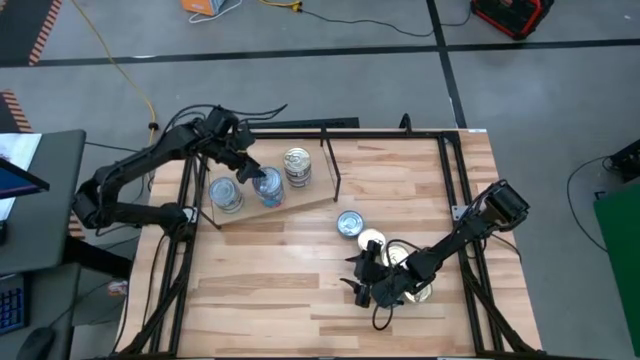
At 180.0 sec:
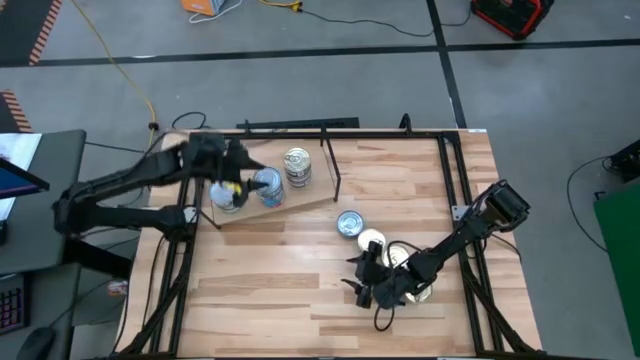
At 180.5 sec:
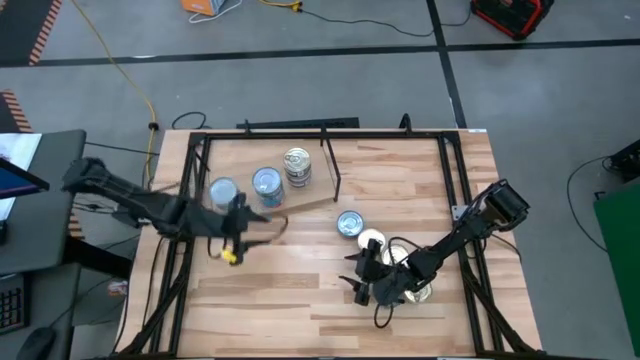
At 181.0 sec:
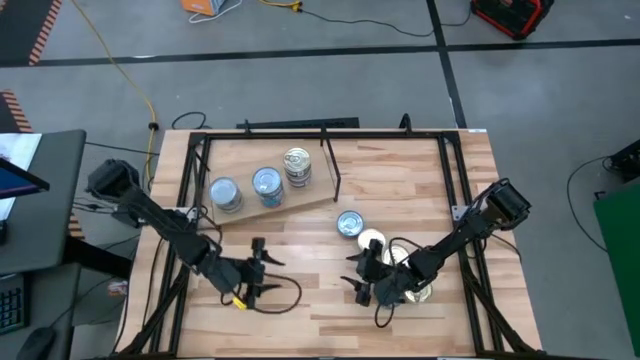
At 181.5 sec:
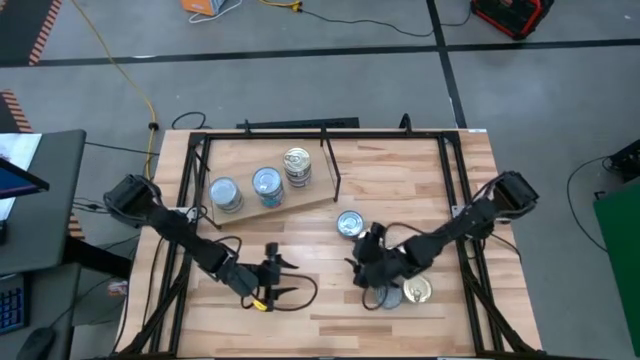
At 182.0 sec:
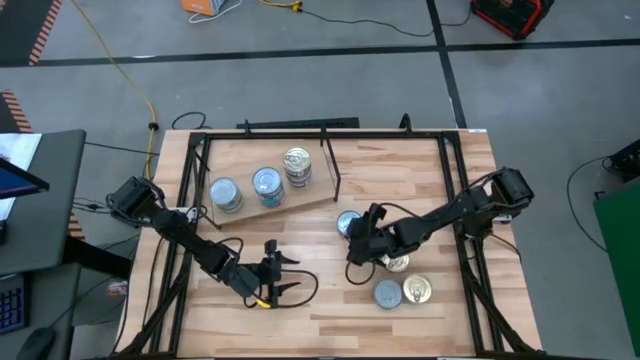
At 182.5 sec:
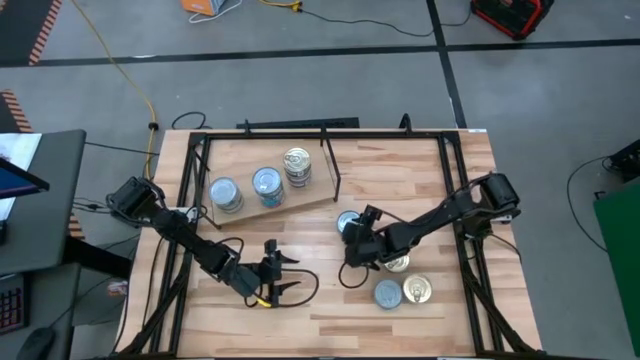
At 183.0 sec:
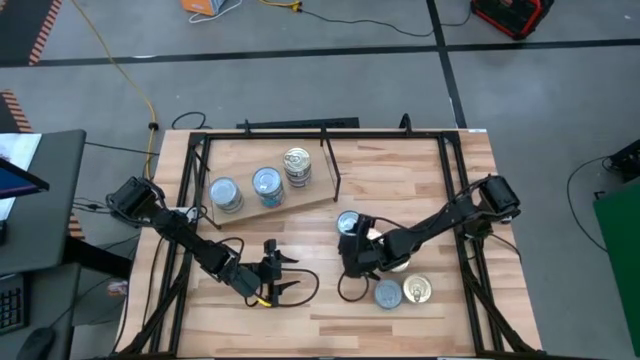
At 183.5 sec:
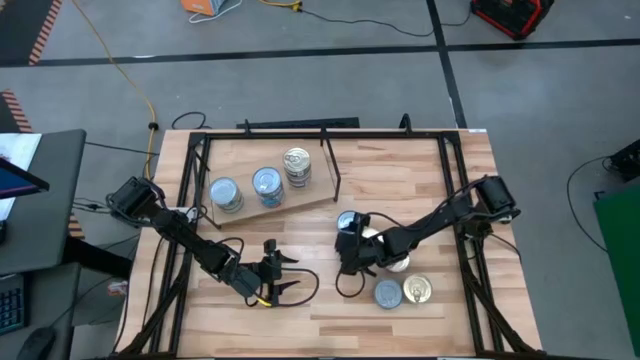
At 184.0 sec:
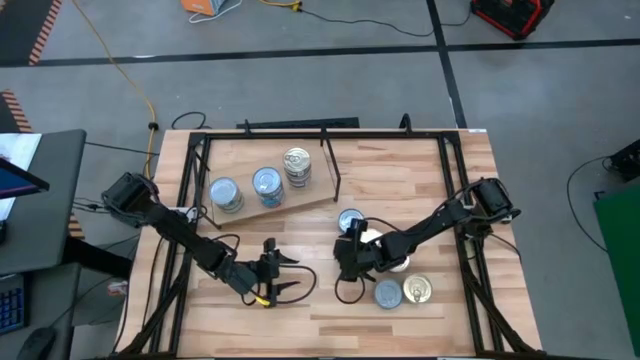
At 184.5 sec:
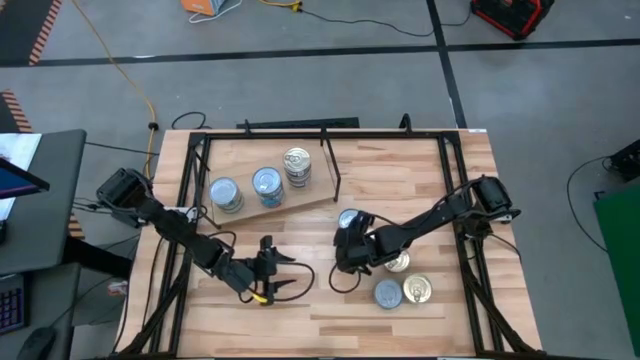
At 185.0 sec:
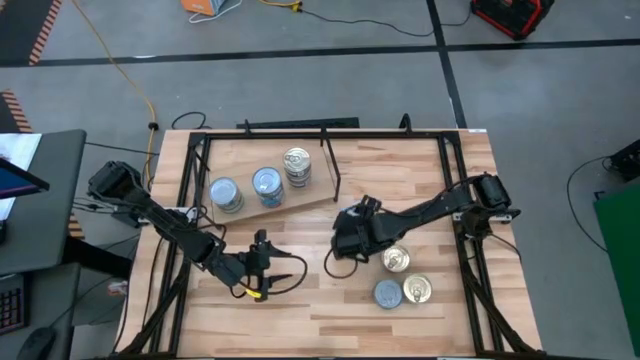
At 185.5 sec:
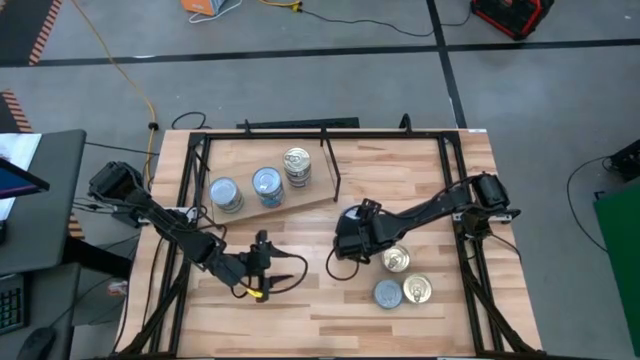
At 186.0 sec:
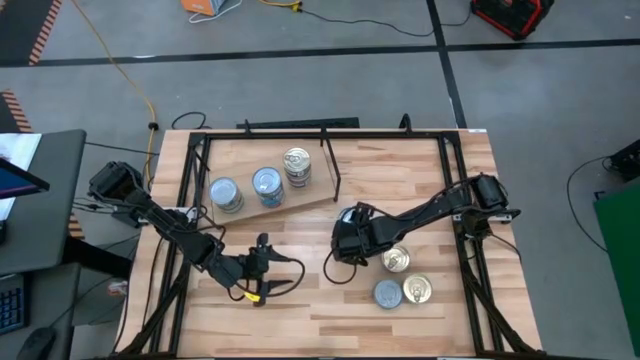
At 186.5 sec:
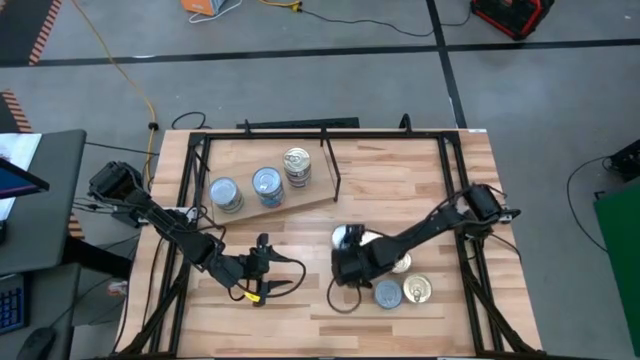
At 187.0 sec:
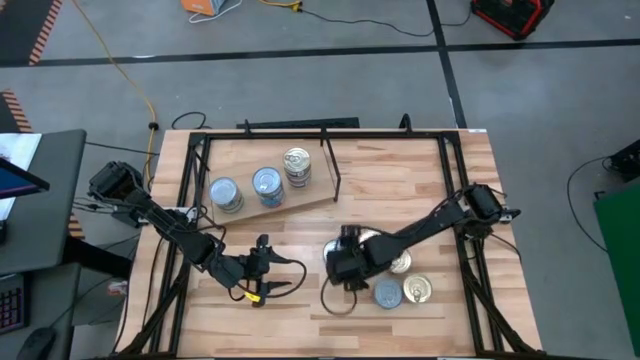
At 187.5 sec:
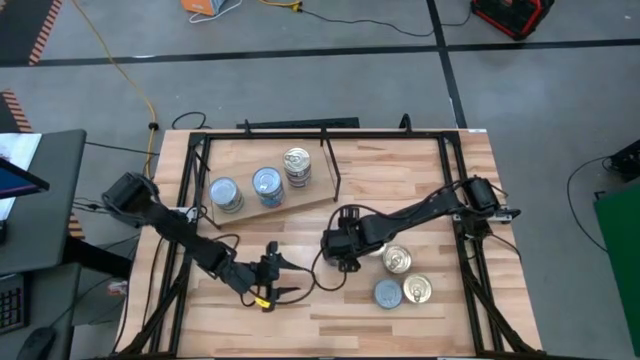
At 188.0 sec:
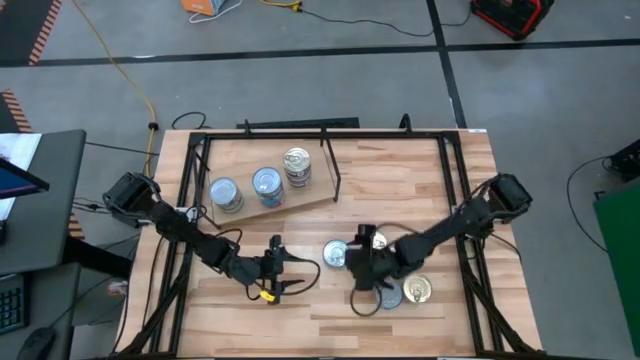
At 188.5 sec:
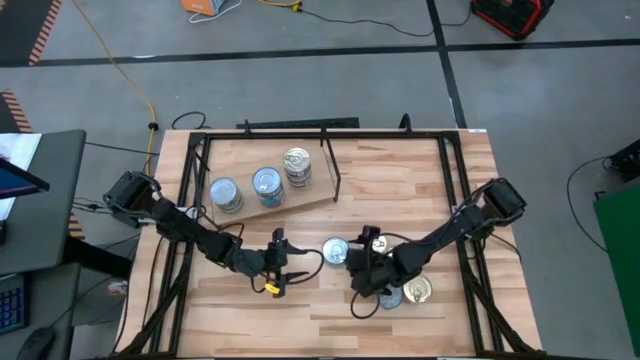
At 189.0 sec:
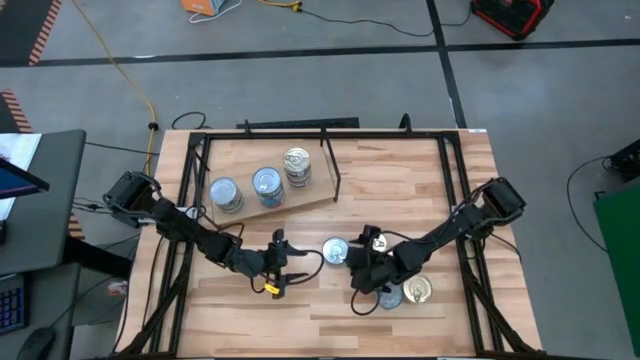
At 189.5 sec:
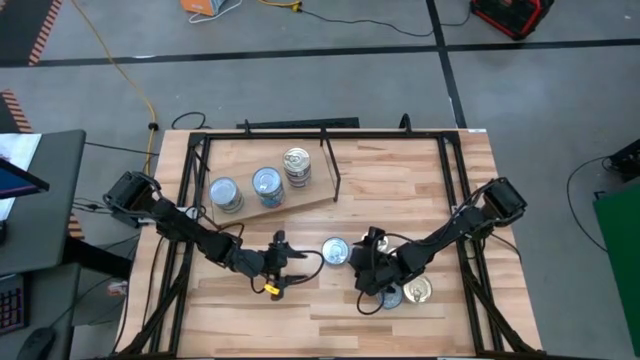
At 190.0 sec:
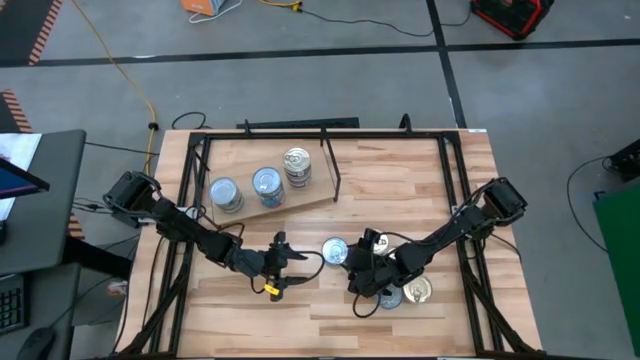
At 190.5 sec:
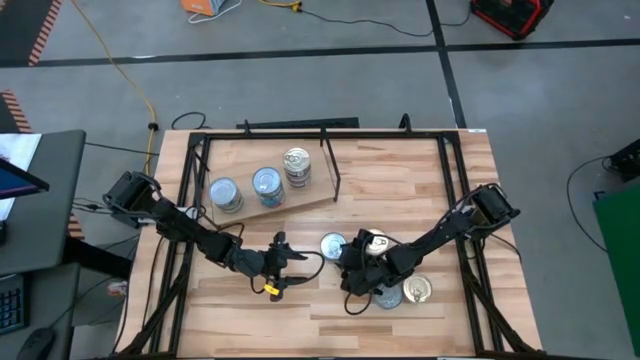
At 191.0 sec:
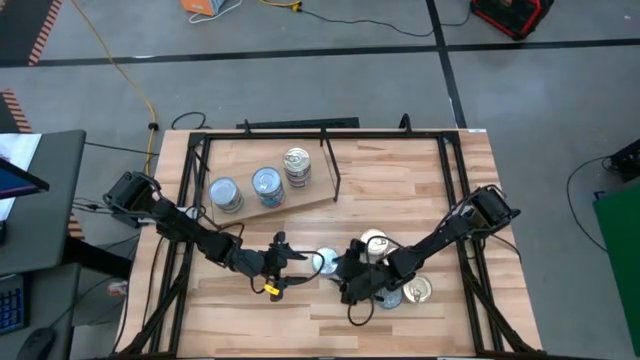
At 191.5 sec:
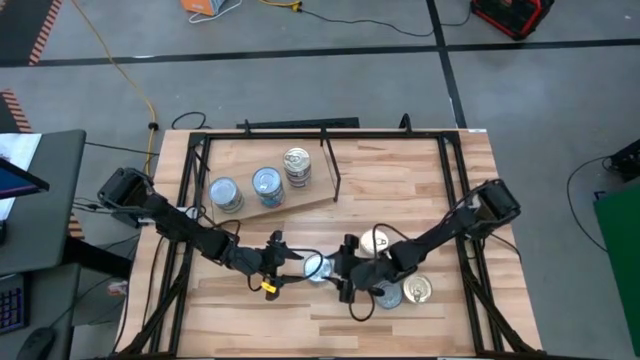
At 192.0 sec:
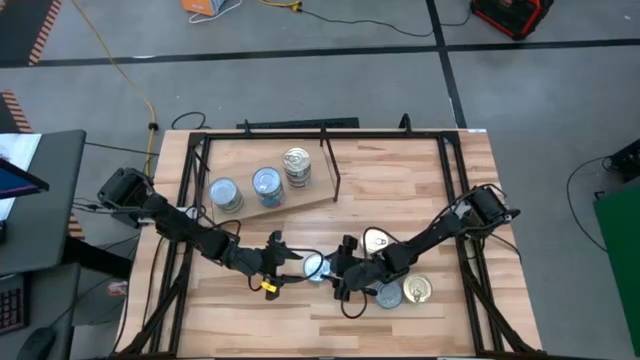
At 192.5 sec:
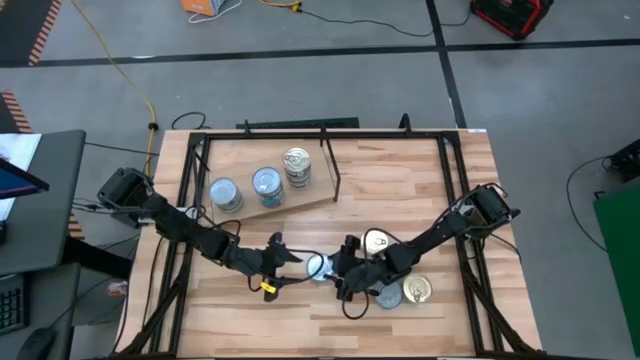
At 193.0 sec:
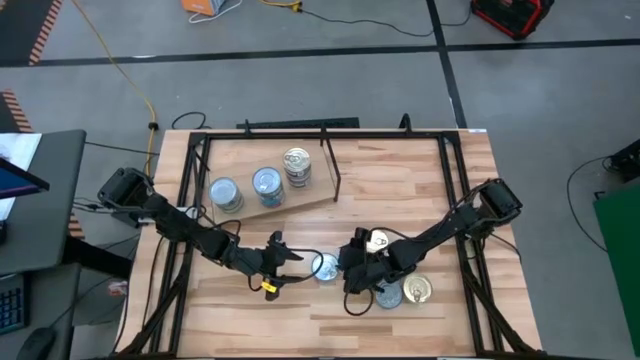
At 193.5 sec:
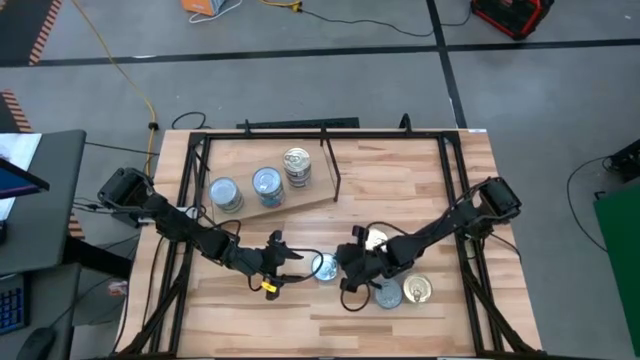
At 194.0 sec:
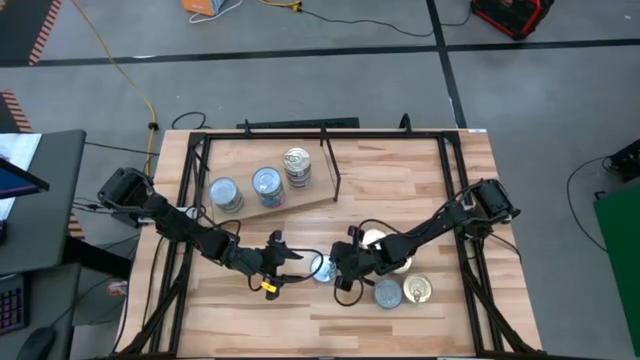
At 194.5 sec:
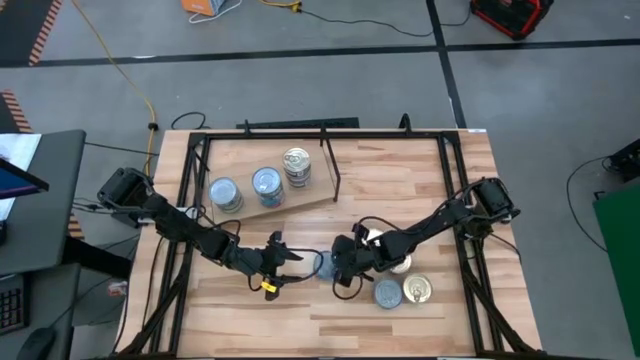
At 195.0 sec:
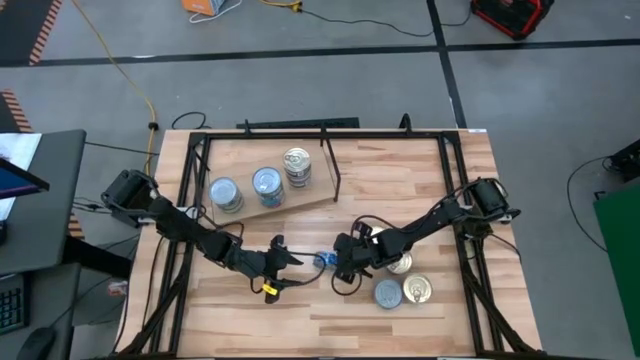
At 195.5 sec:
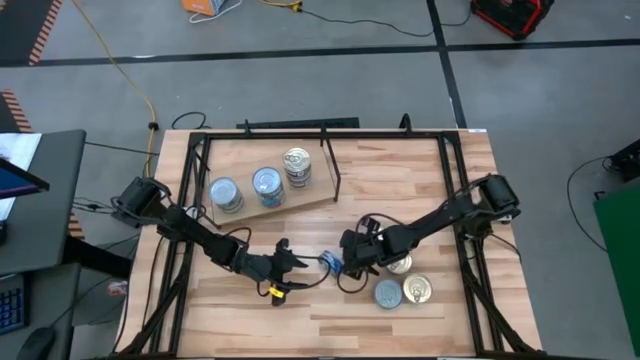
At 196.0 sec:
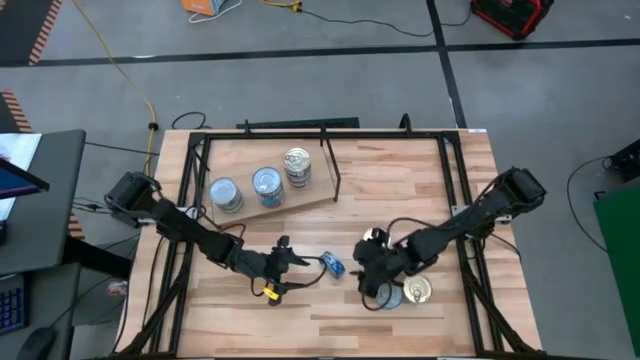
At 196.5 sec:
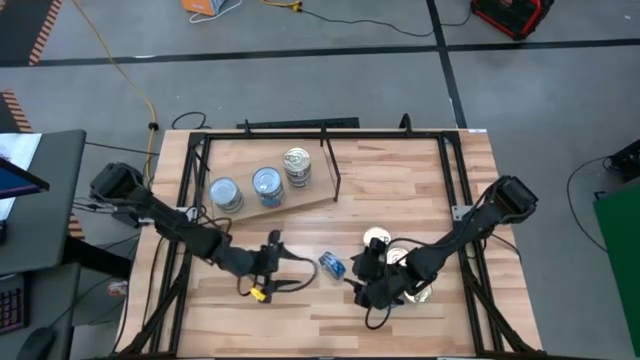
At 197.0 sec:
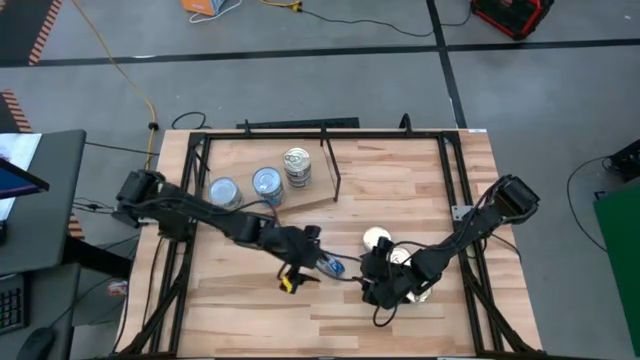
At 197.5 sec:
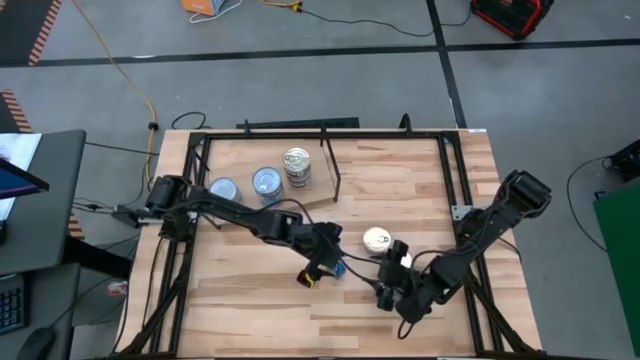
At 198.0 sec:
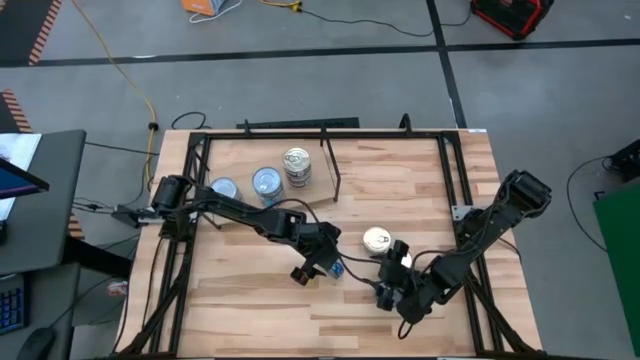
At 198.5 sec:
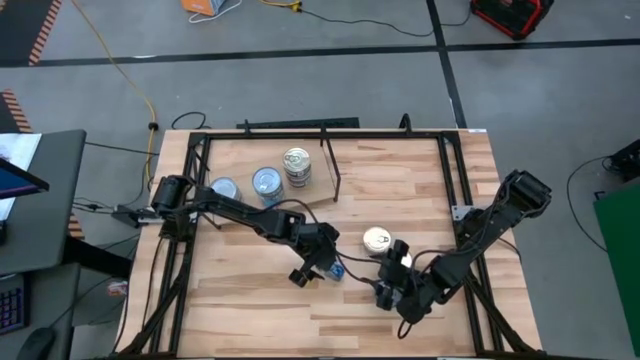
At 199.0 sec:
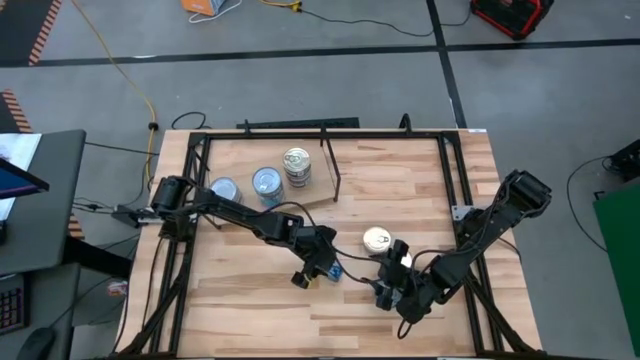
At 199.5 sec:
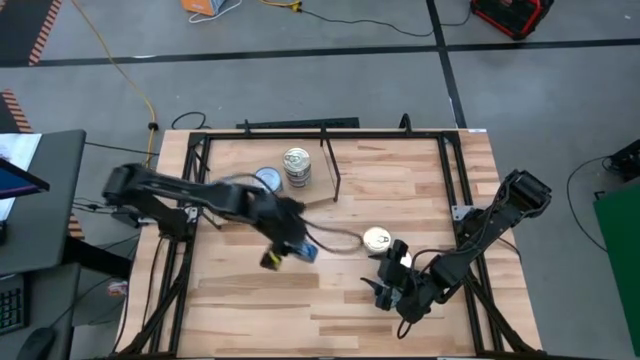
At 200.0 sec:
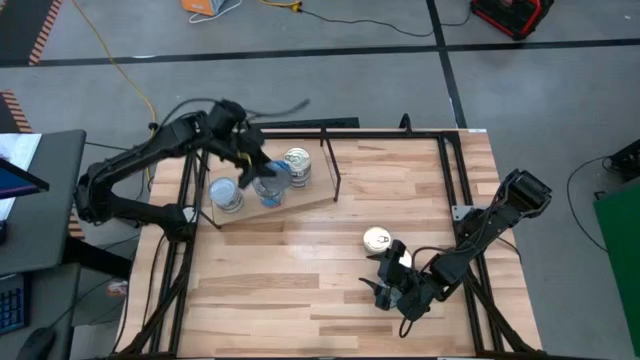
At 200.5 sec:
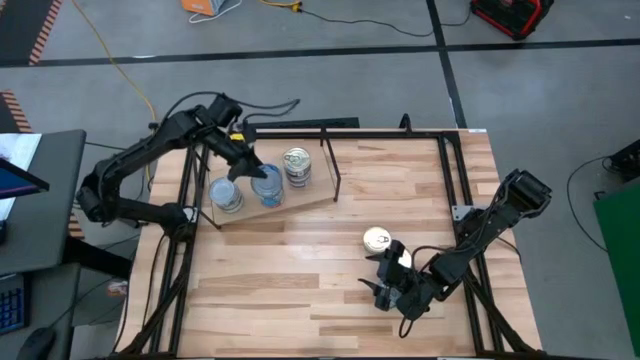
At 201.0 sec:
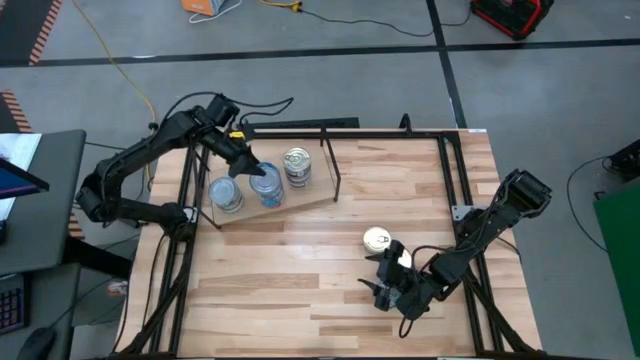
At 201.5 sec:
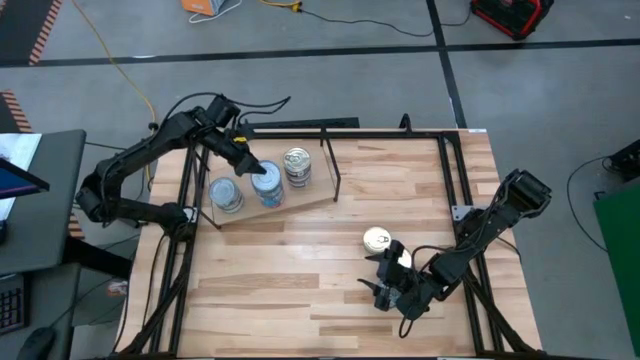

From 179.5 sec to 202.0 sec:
Task: Stack canned seafood by type on shelf
Stack the blue tuna can on top of the green tuna can on the shelf
